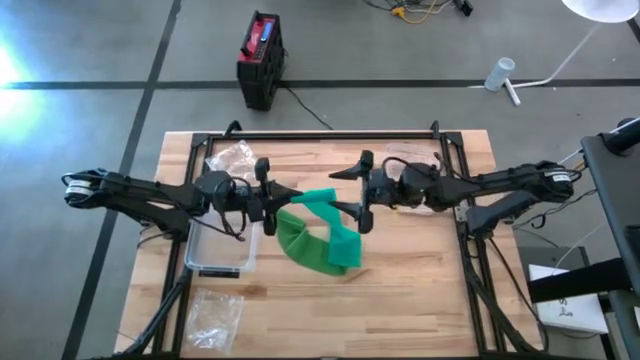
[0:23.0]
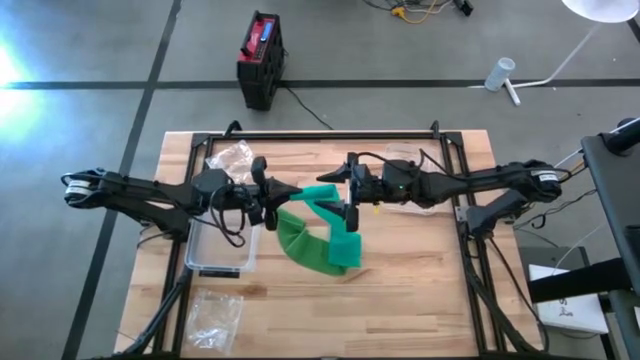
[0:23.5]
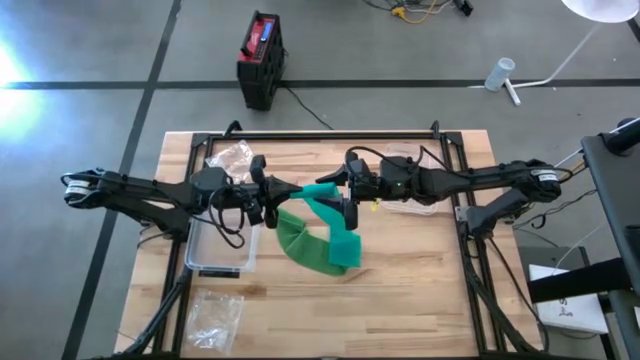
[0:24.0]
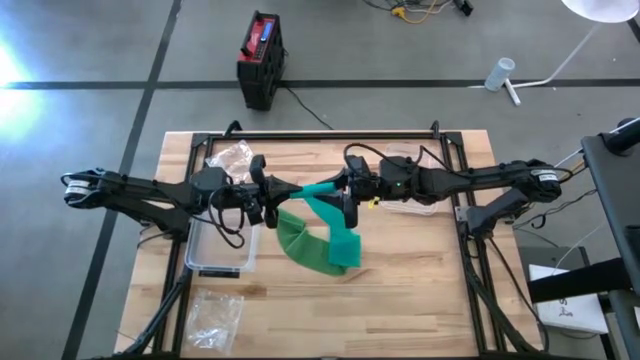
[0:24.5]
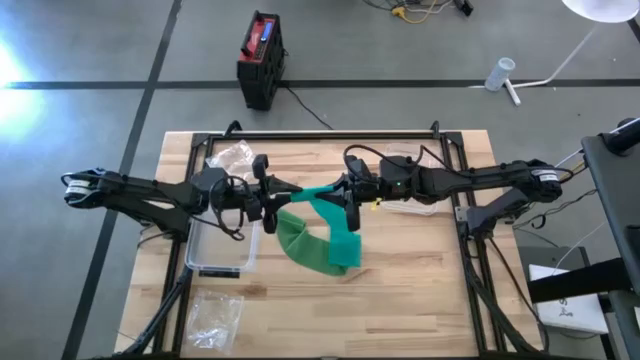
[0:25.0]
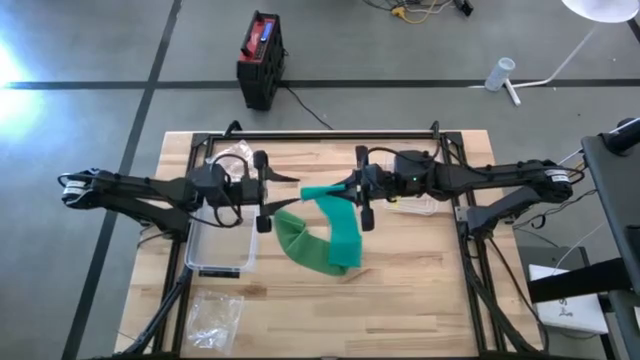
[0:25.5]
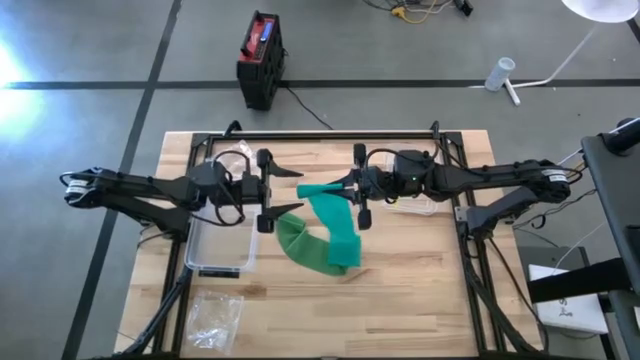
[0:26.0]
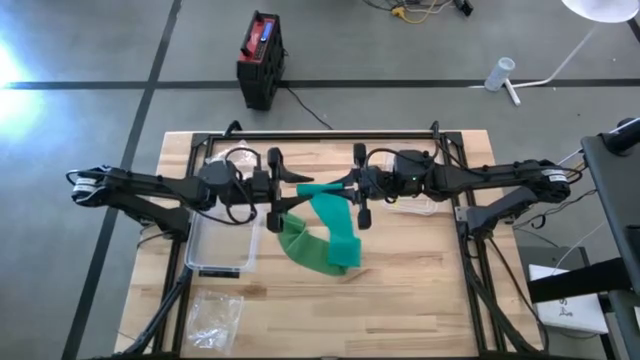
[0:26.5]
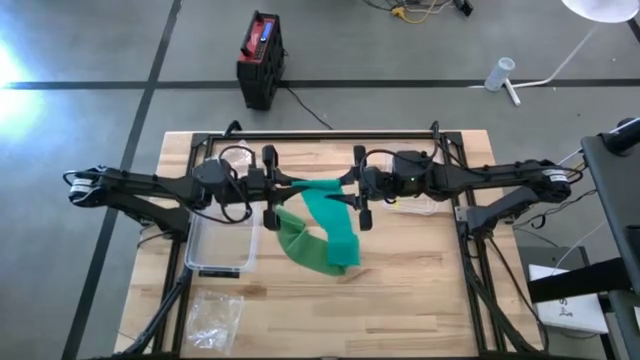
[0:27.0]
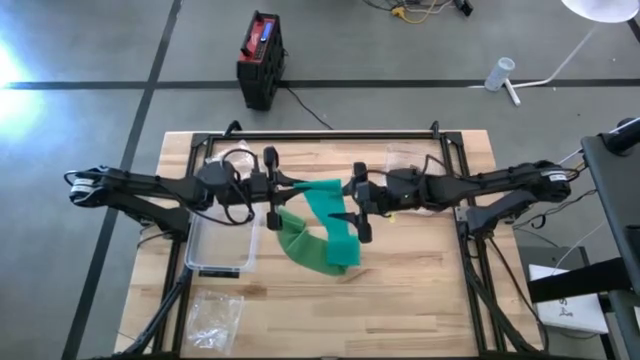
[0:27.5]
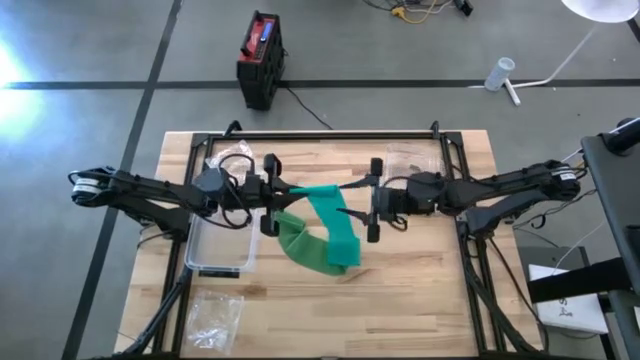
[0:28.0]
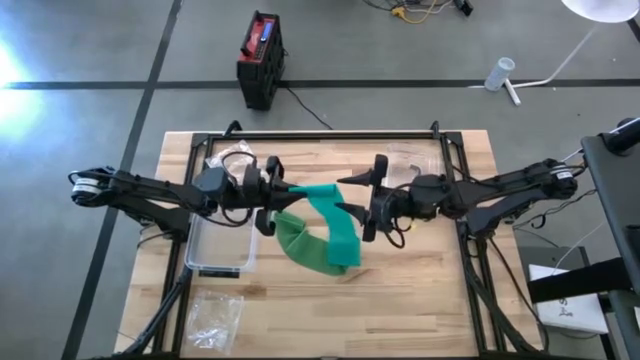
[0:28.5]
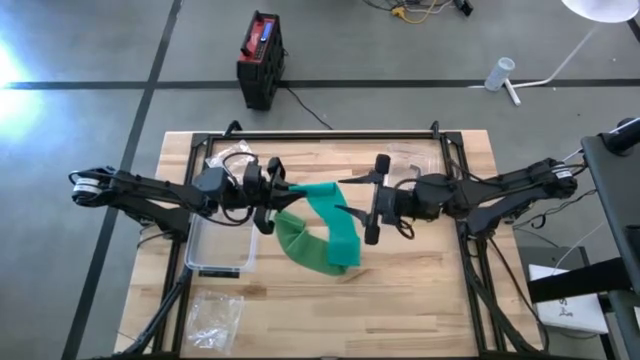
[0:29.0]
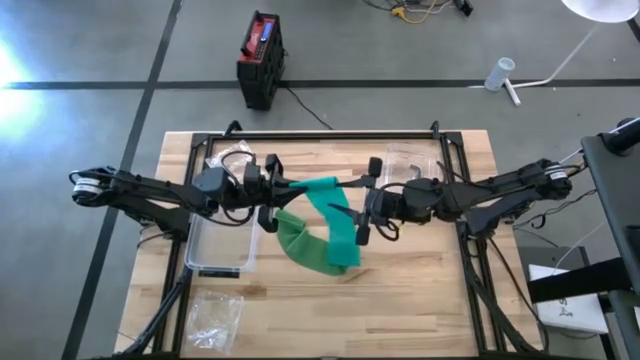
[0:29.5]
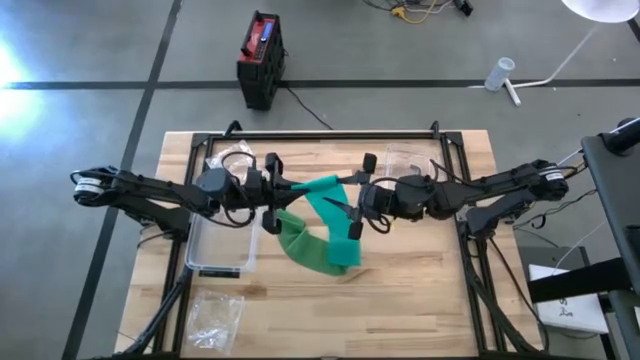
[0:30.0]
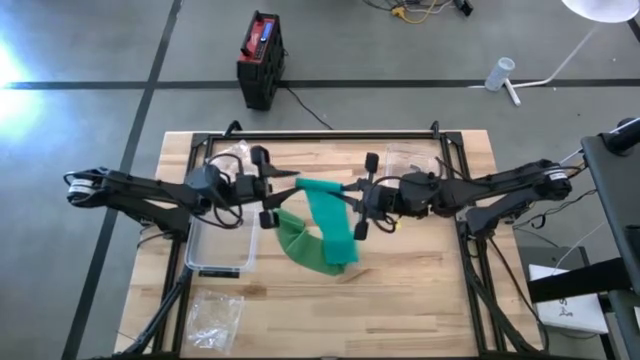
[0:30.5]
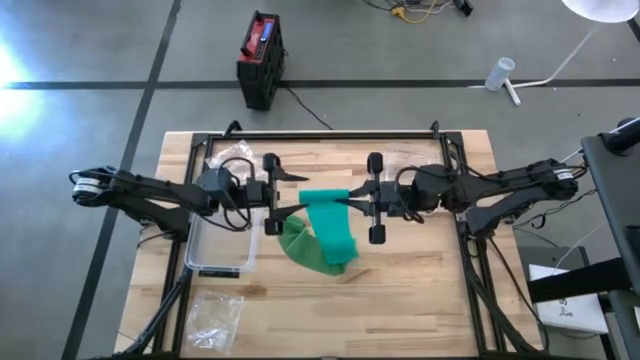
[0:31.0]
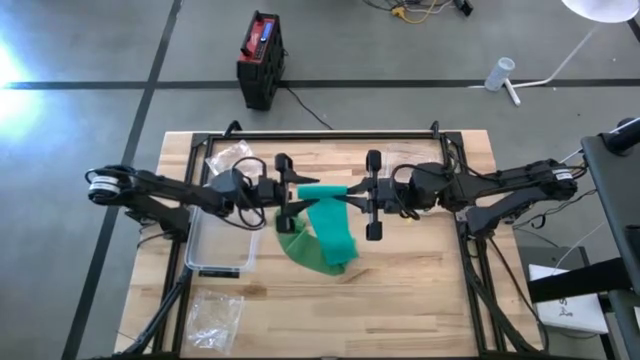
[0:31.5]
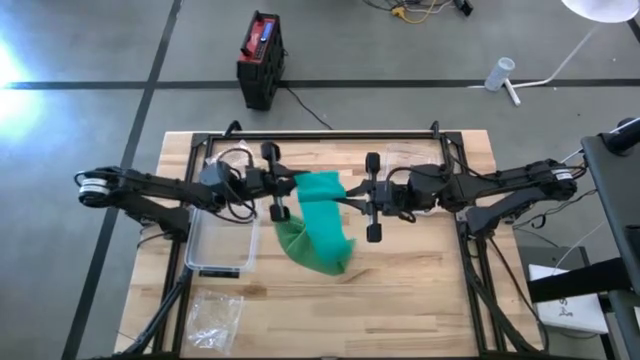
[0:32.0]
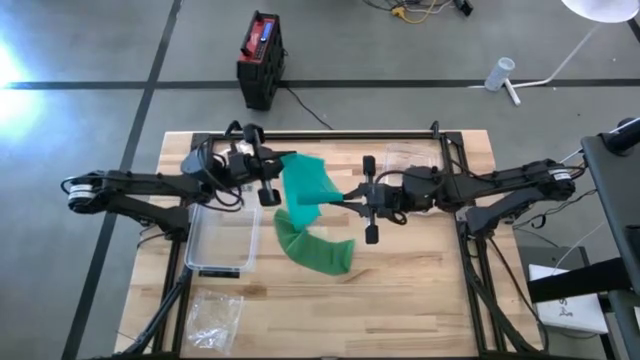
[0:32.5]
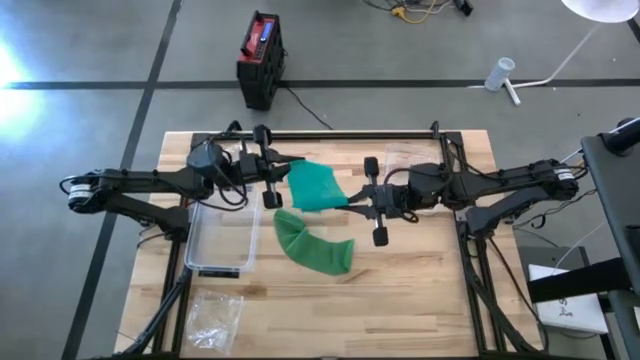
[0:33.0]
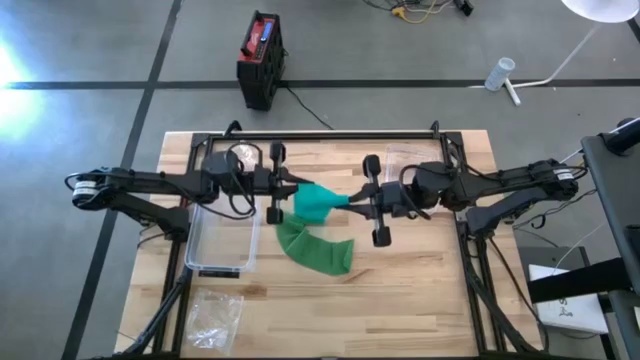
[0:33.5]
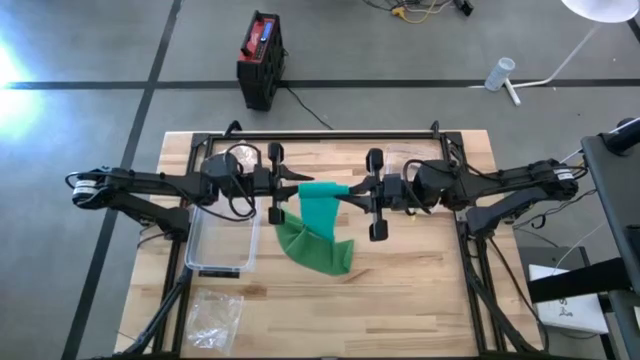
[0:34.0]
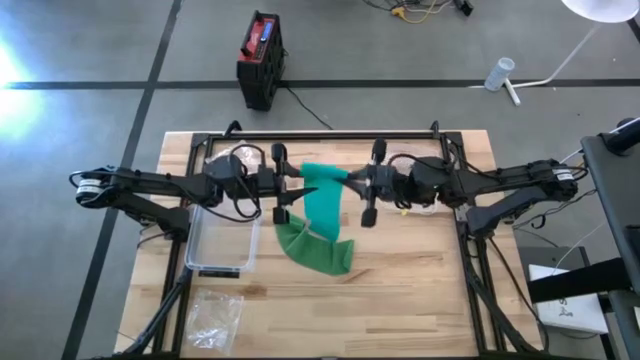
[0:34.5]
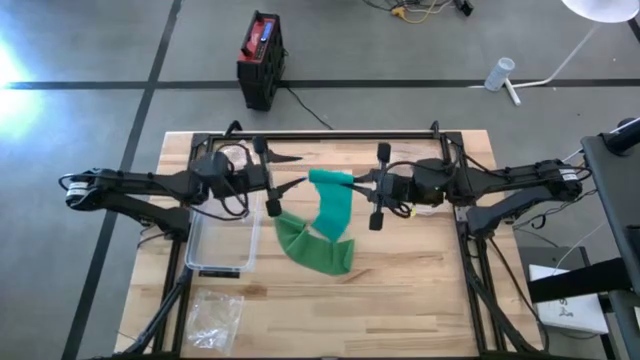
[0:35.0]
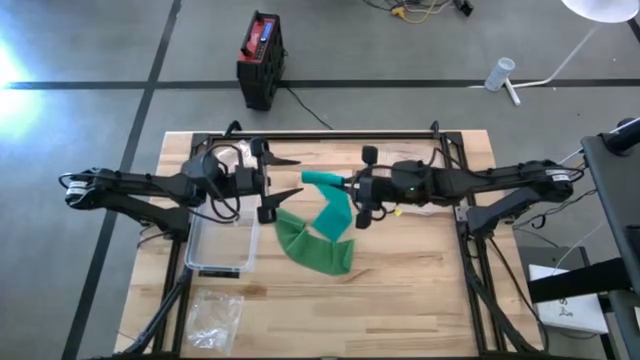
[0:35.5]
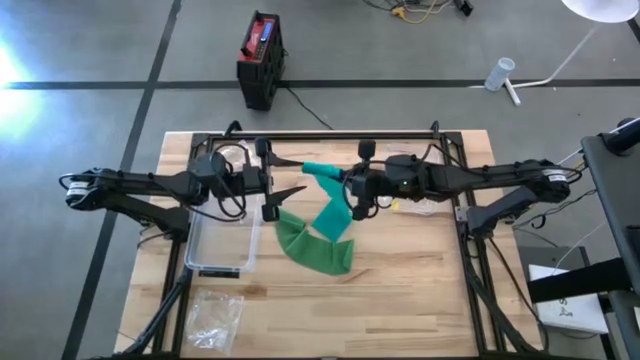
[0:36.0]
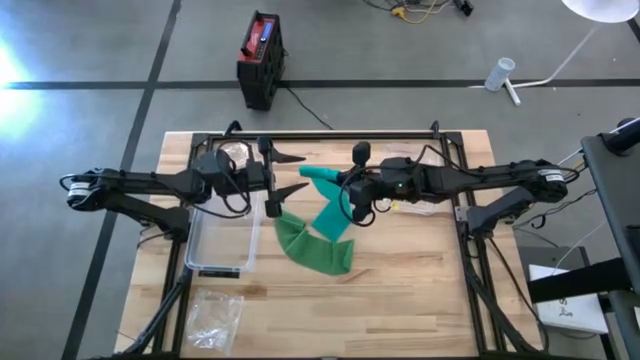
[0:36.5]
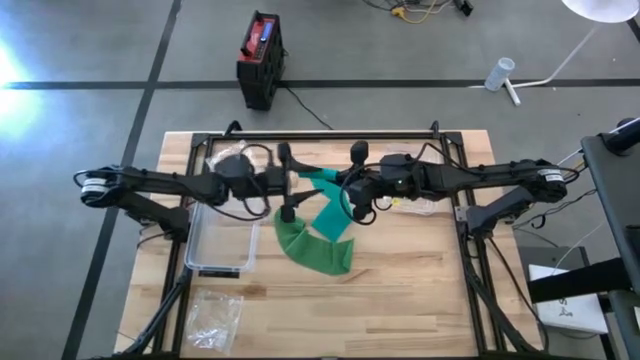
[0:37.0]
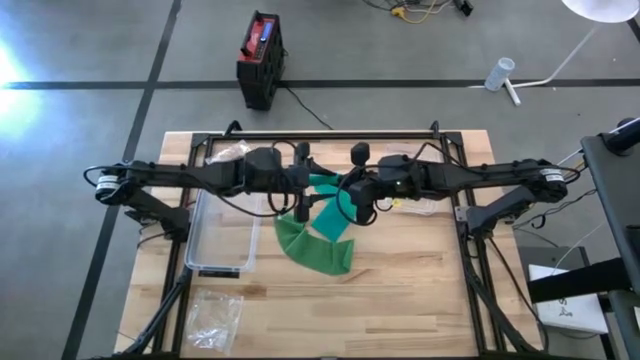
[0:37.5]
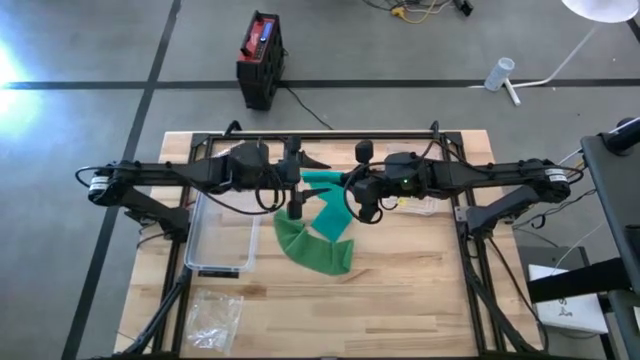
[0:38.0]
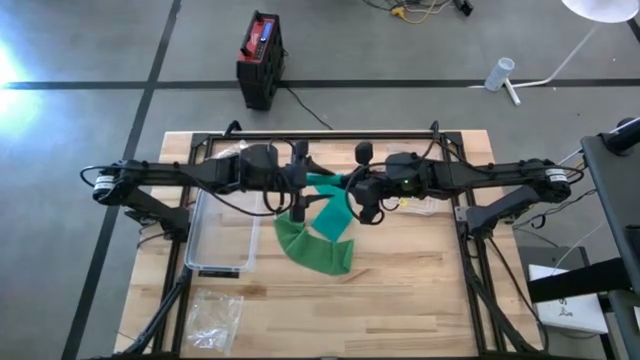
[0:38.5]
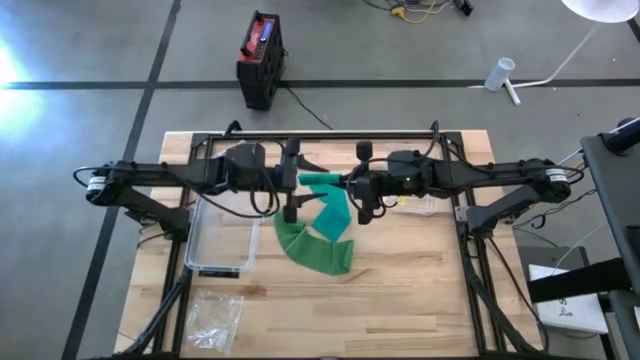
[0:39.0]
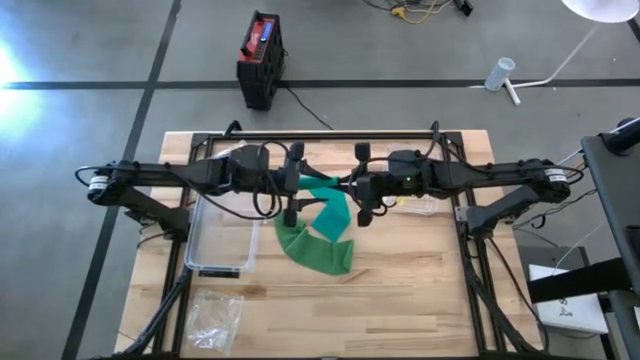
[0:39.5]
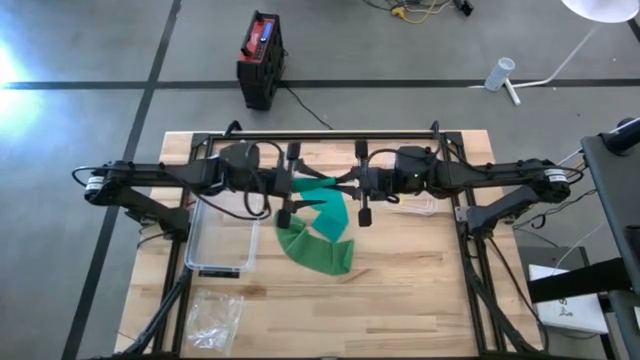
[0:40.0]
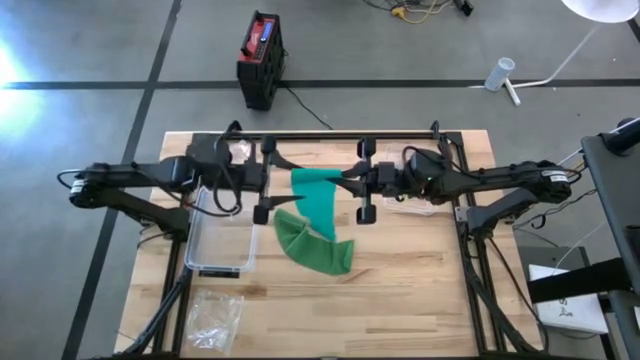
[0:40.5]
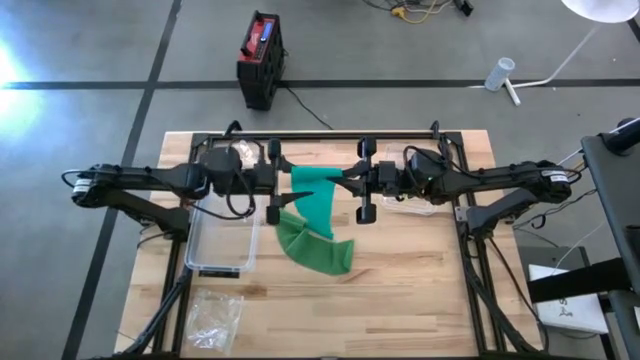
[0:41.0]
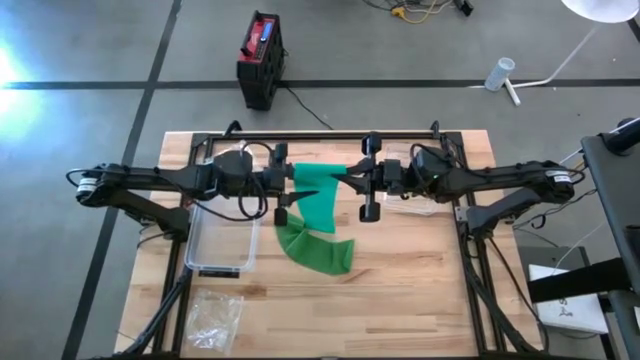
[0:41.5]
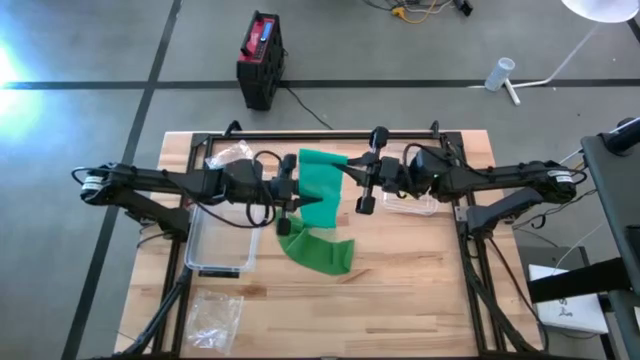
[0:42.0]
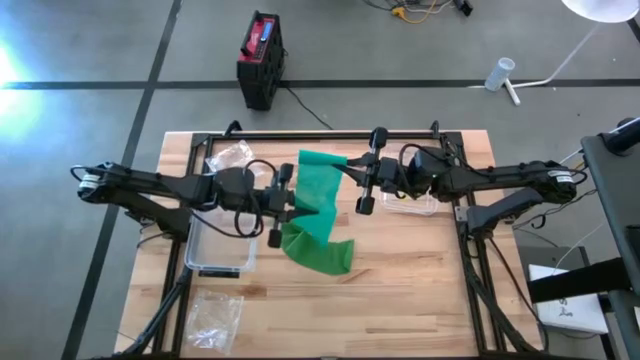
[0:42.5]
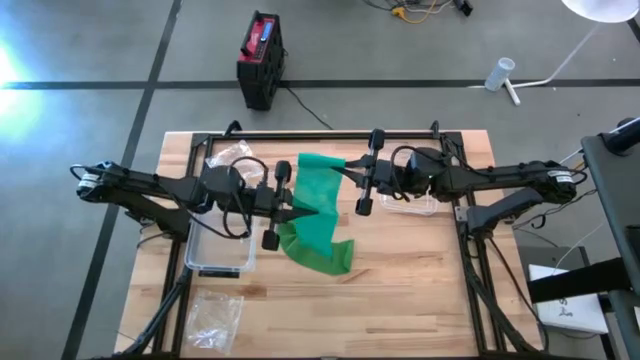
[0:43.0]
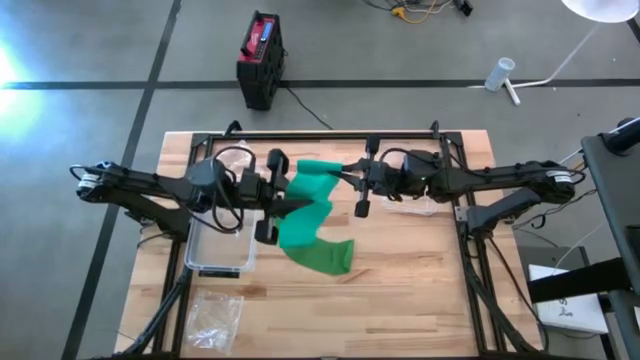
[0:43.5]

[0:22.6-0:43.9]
Task: Roll bandage
Roll the light green bandage
